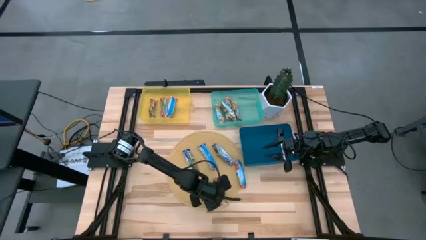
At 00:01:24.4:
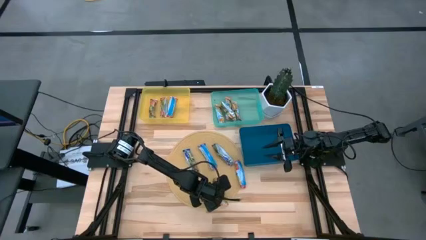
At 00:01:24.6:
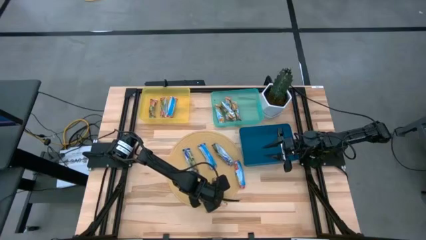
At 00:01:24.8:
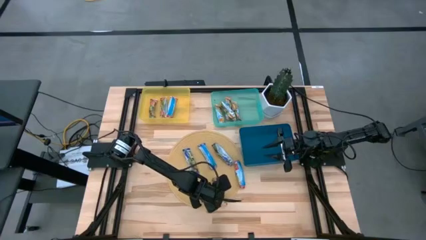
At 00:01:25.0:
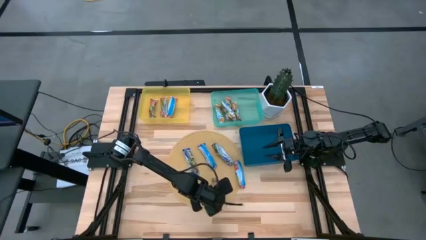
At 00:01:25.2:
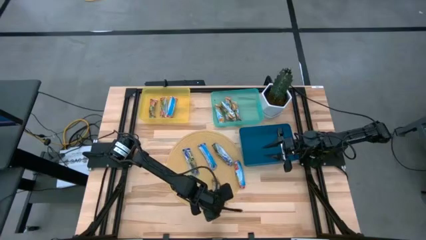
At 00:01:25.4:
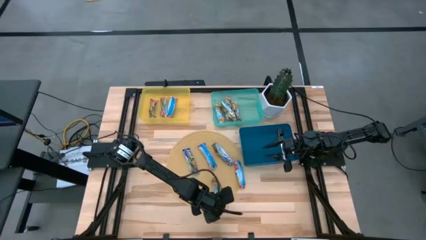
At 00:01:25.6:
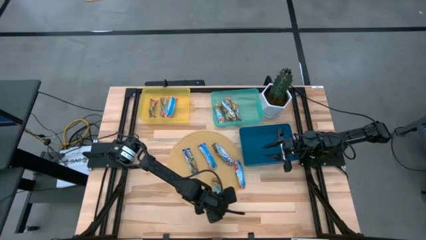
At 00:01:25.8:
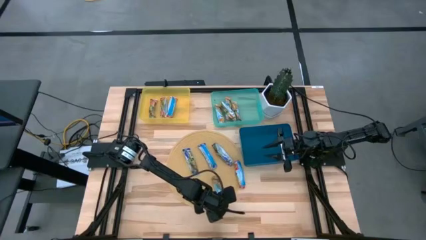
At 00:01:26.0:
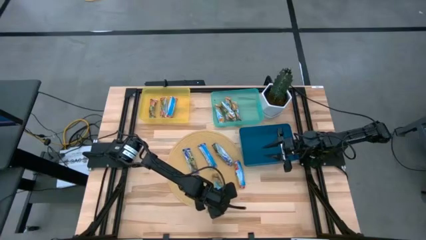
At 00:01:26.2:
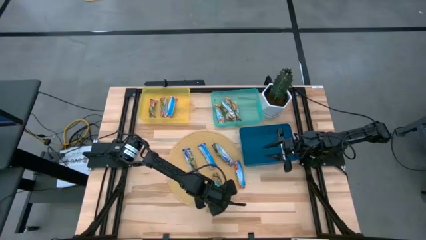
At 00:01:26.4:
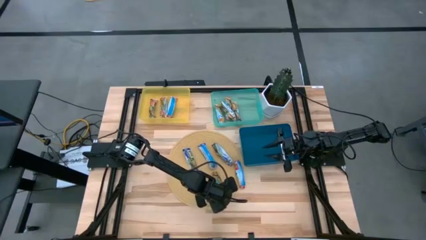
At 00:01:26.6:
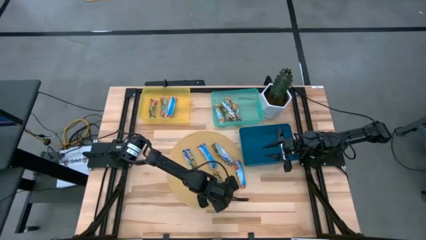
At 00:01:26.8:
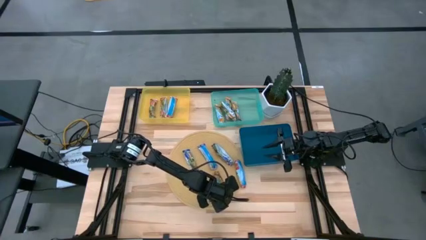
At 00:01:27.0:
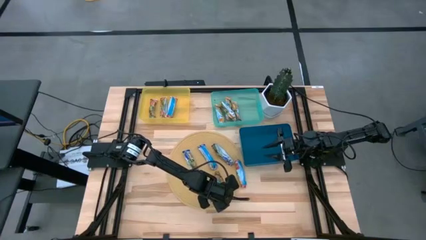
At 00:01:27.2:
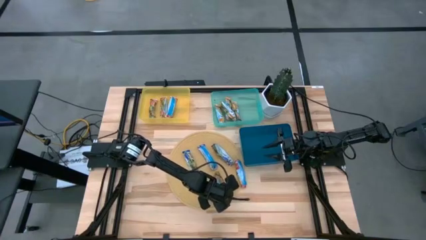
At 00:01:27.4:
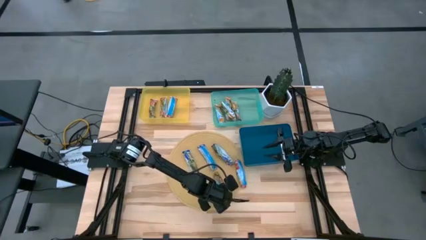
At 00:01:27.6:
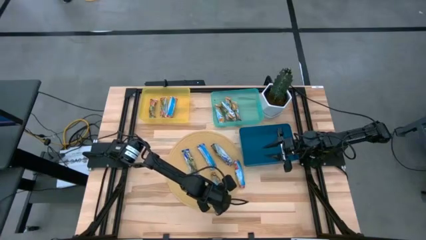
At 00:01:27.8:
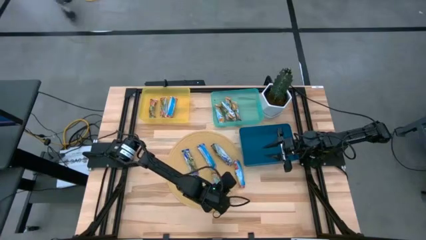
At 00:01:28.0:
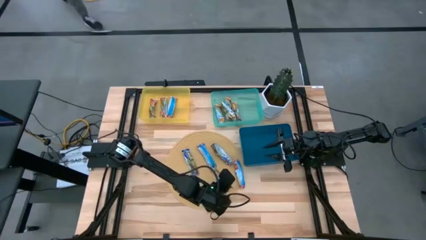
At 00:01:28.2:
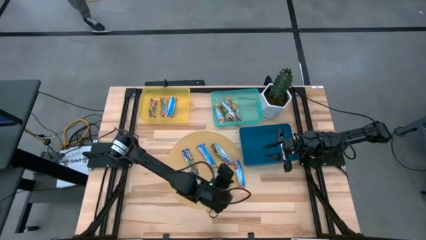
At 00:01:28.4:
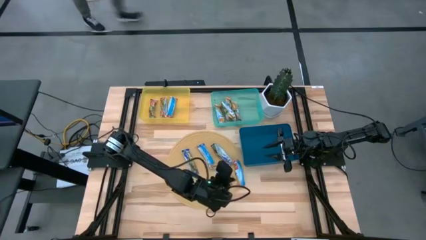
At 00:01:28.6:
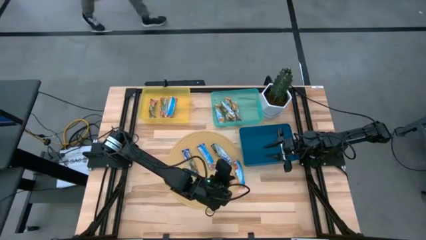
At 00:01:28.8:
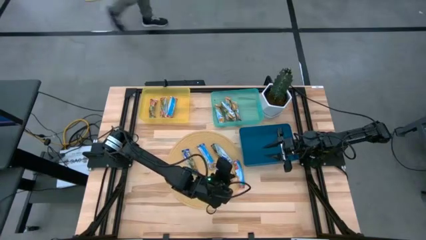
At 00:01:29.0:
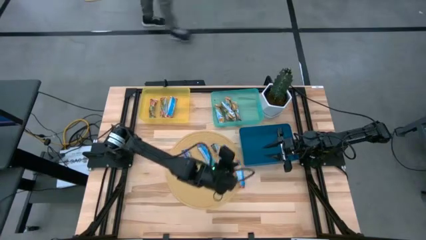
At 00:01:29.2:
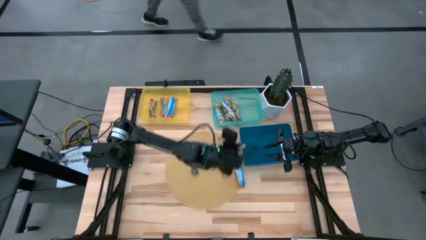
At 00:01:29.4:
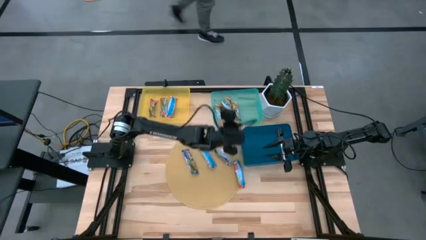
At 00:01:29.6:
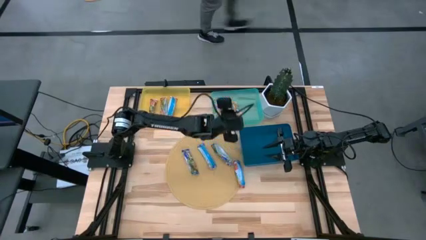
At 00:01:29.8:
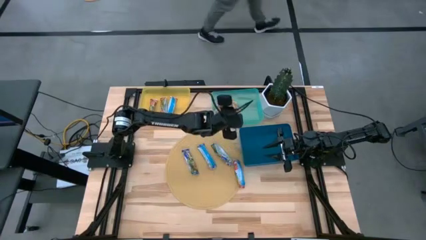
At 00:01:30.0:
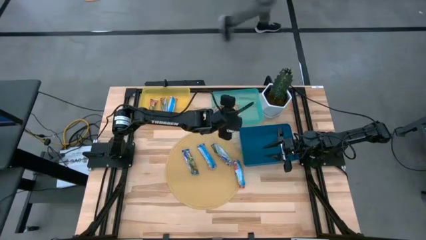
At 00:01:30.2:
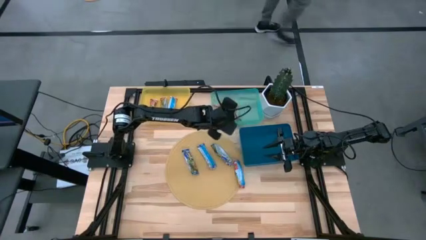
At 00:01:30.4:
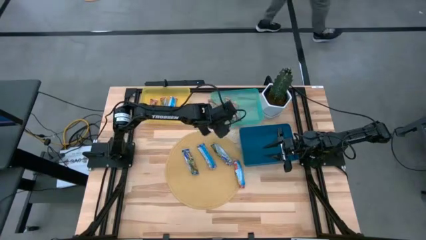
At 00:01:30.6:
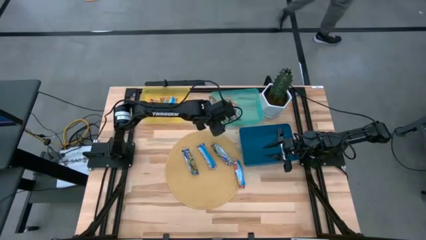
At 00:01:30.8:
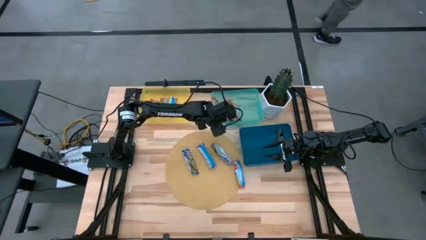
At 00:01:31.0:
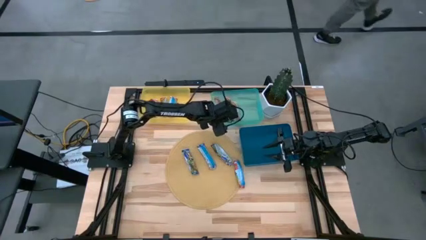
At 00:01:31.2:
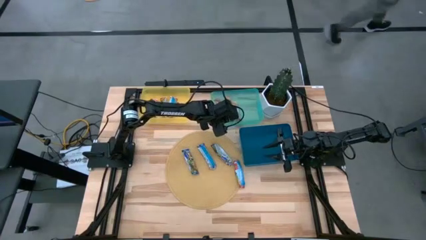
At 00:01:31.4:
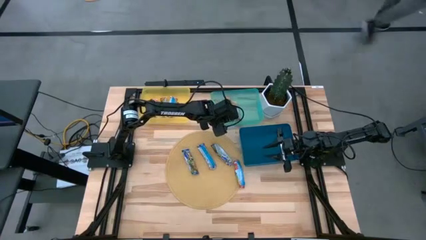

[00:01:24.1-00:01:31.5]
Task: Pick and place Granola Bars by type
Put the orange granola bar into the green bin

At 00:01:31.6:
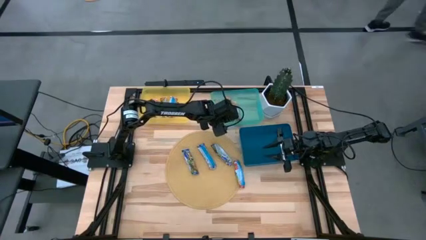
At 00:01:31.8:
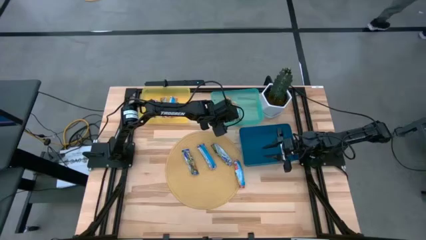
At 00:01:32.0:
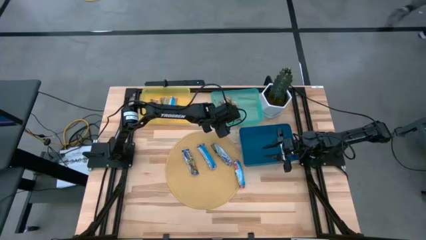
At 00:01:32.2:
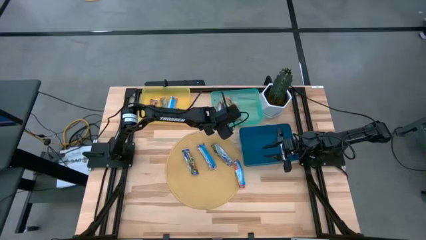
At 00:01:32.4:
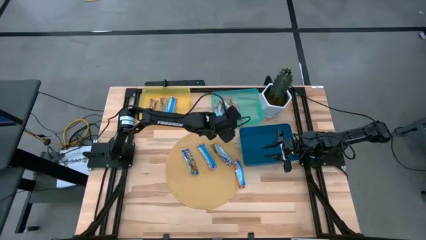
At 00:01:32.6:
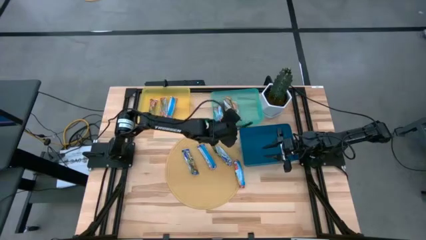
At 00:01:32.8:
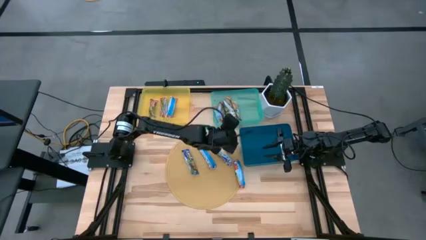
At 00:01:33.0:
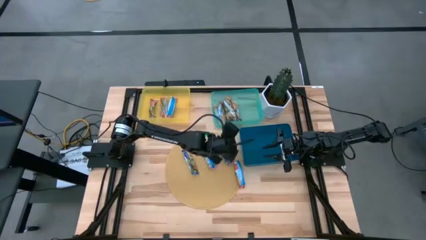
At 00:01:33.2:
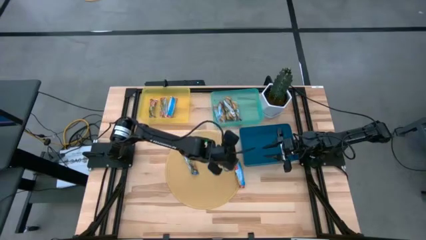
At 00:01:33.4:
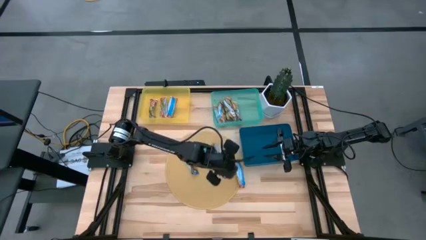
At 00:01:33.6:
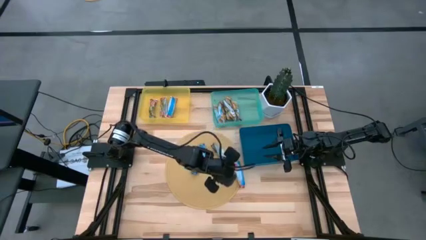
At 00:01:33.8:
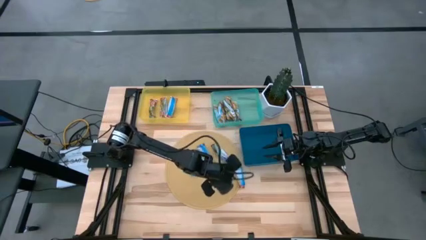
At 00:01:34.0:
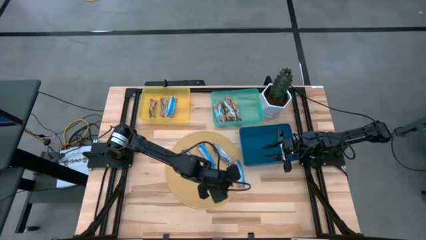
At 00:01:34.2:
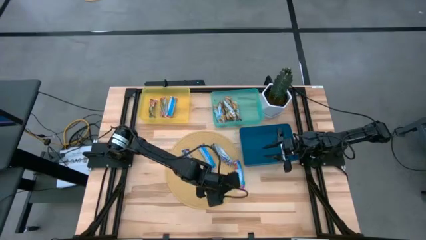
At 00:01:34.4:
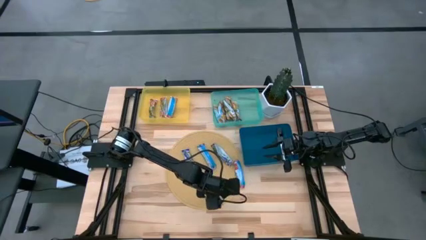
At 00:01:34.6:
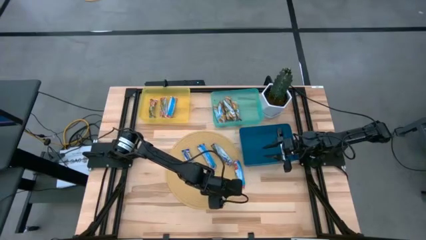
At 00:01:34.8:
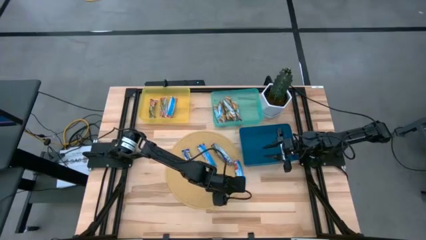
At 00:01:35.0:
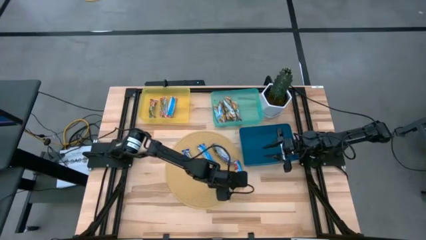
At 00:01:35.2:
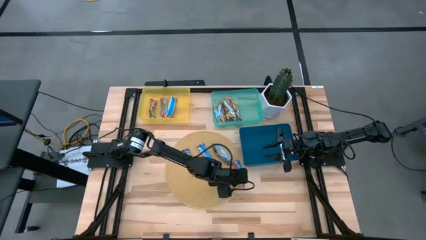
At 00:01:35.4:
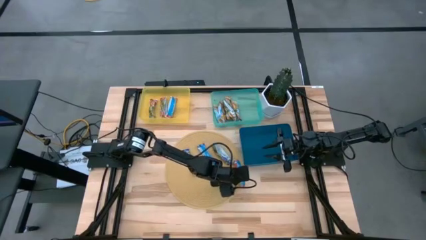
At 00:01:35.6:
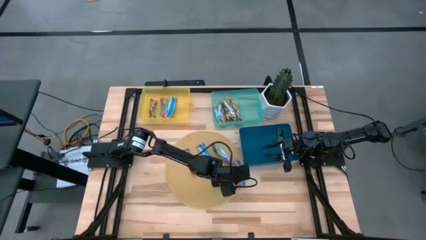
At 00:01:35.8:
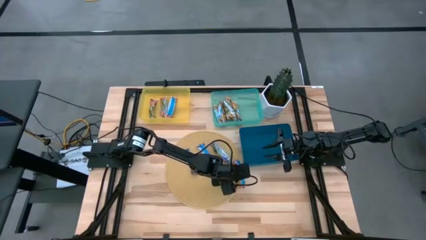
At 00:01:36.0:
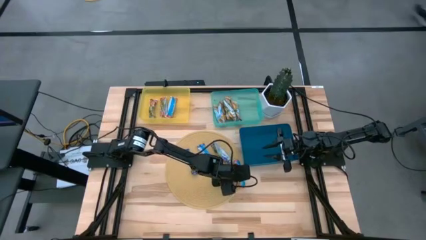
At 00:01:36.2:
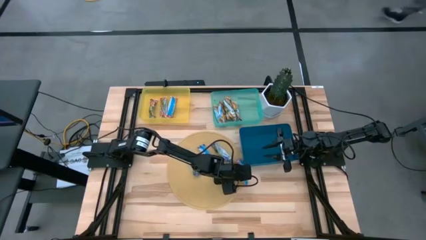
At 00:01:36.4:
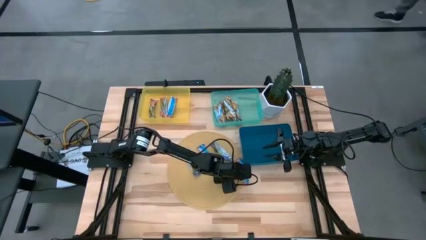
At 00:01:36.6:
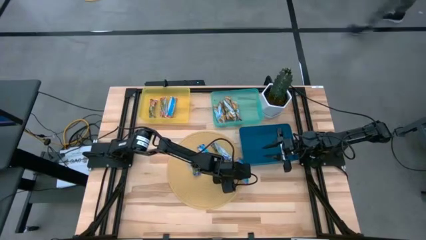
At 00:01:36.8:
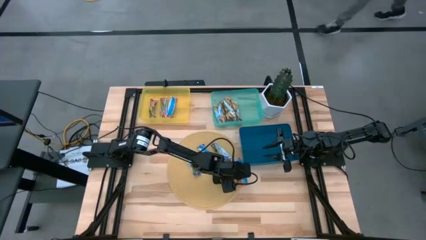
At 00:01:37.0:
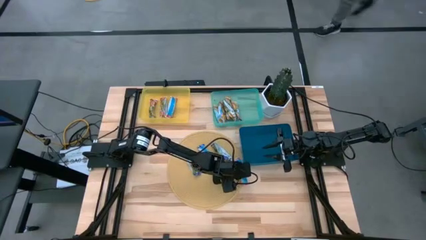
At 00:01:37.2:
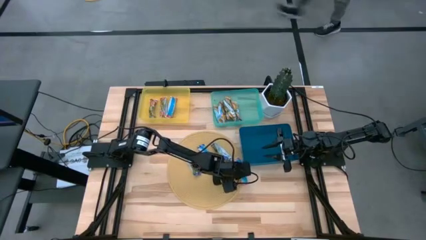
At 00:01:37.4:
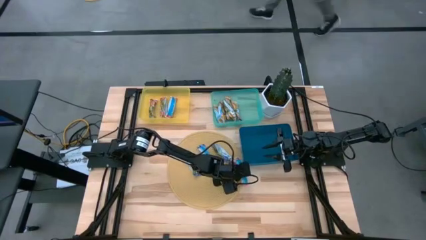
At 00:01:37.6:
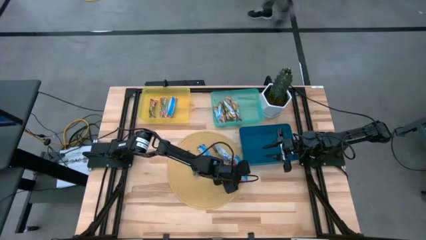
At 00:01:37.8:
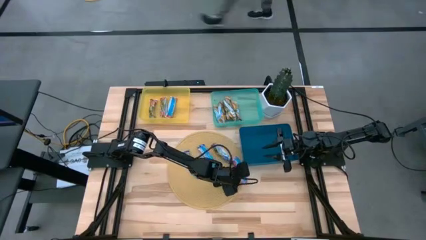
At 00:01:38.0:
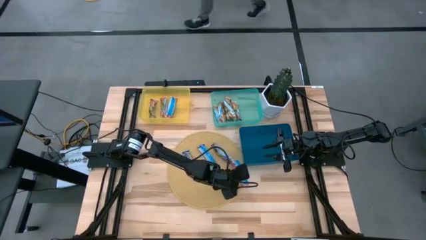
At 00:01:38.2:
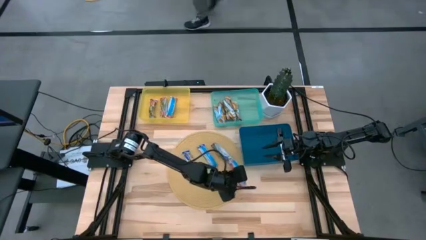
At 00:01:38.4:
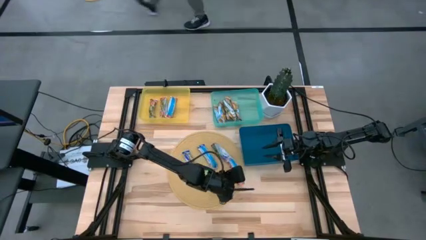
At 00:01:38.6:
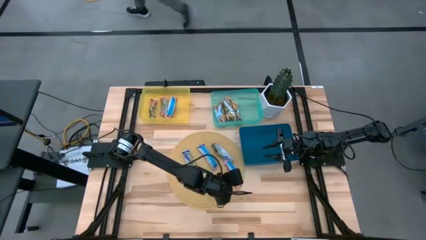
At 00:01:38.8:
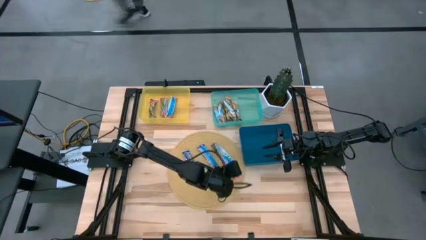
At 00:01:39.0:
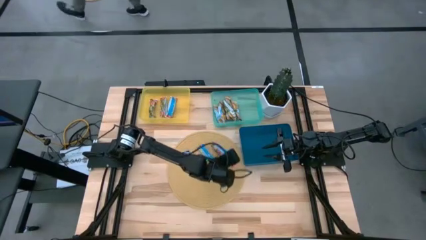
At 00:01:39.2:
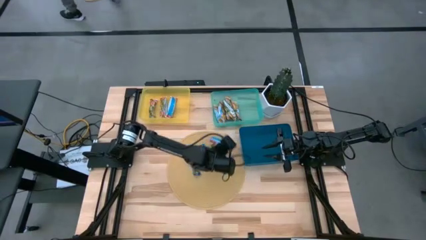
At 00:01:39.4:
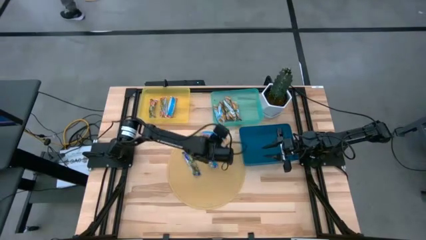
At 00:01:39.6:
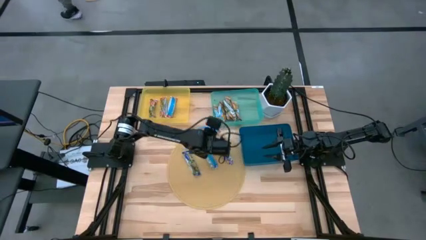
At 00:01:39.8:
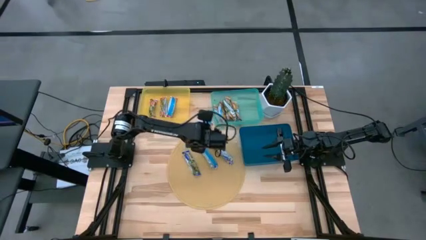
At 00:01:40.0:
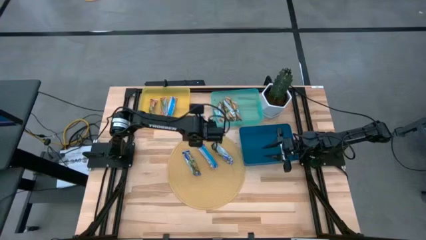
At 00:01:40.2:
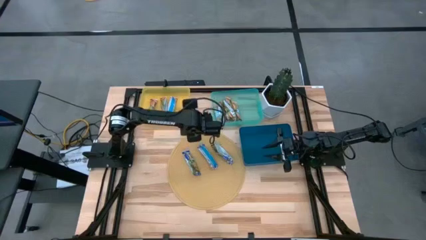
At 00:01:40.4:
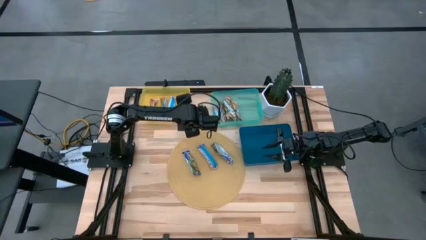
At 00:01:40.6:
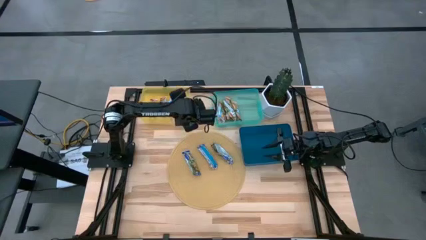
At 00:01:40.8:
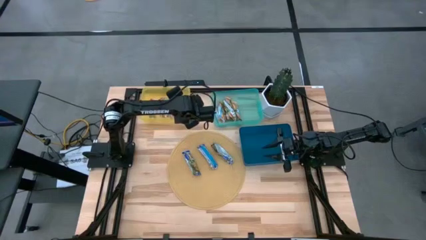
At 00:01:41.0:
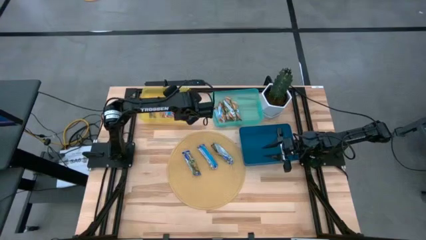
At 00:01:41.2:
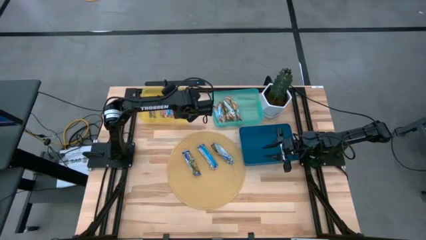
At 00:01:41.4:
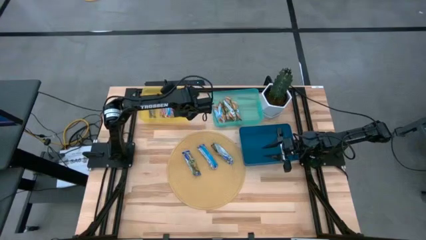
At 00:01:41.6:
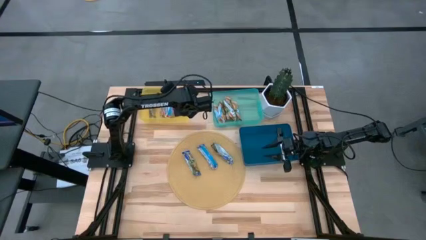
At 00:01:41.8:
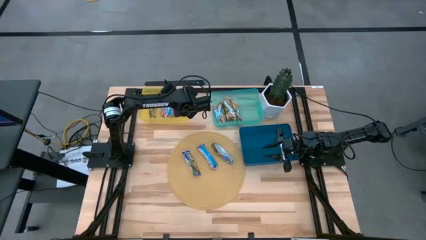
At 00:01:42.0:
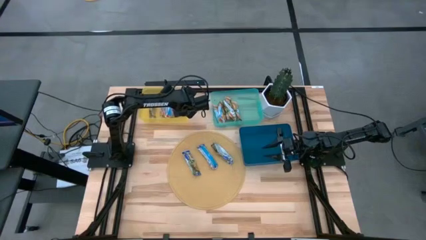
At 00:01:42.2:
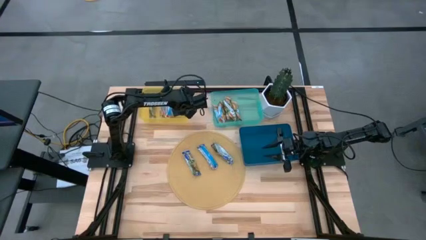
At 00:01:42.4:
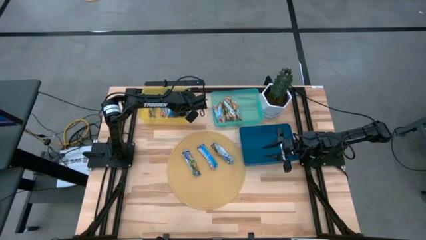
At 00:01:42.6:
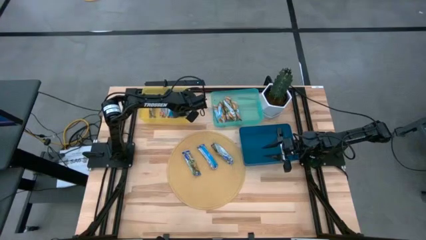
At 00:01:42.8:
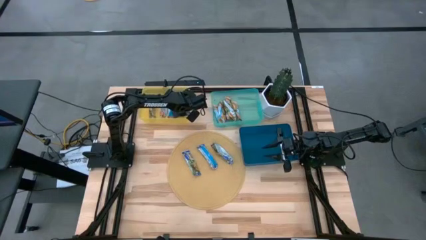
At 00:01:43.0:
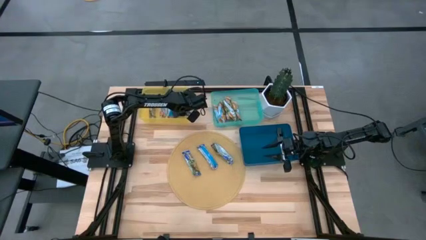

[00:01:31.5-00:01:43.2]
Put the red granola bar into the yellow bin
